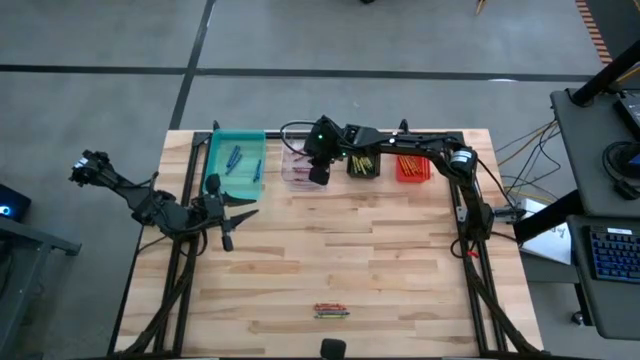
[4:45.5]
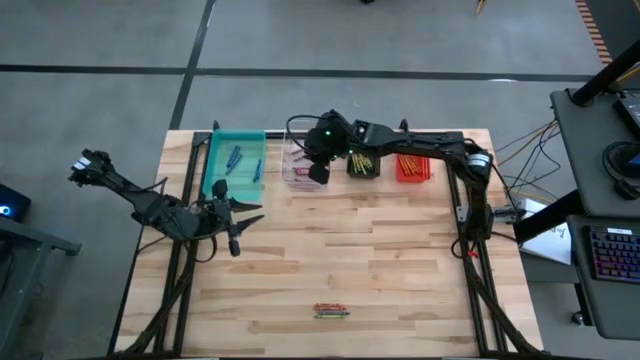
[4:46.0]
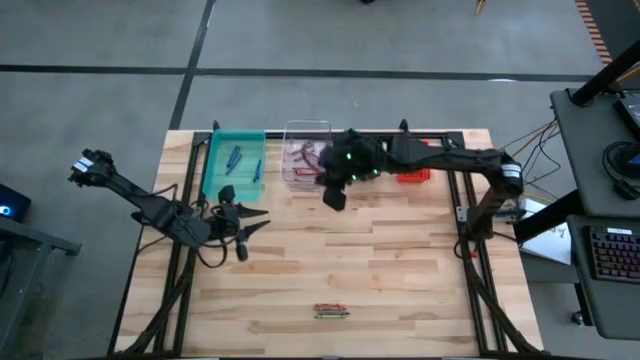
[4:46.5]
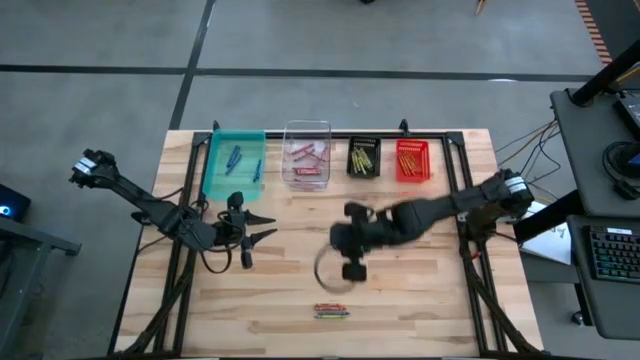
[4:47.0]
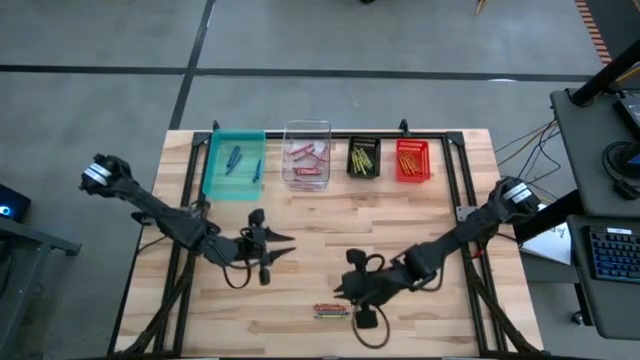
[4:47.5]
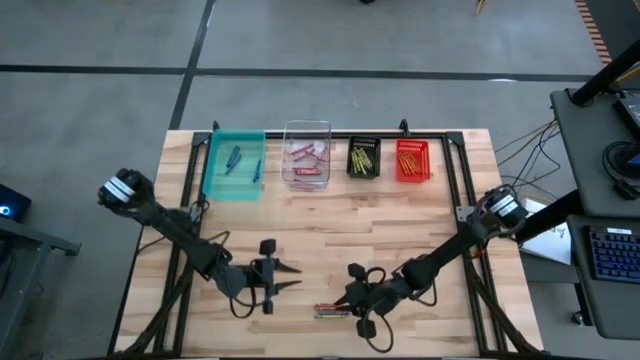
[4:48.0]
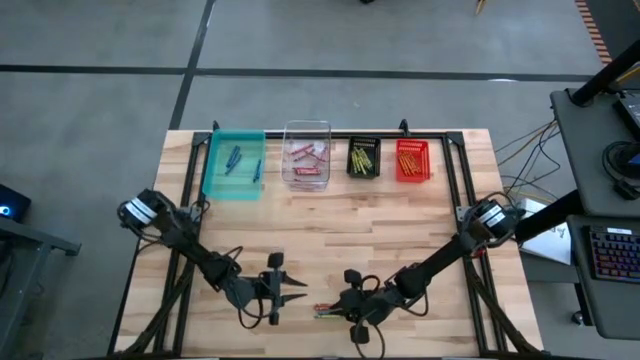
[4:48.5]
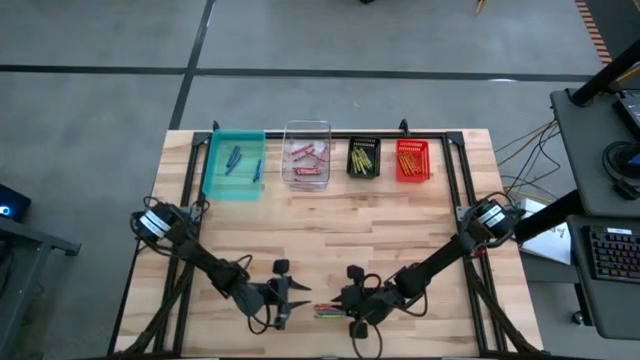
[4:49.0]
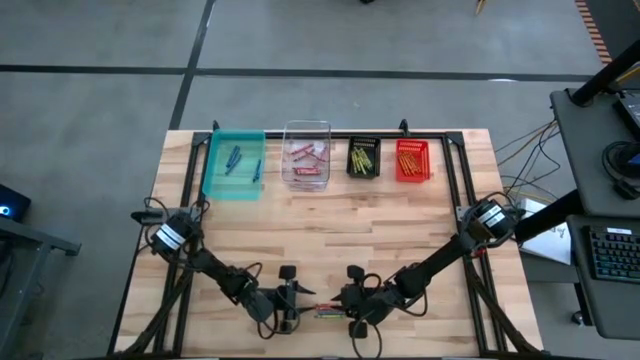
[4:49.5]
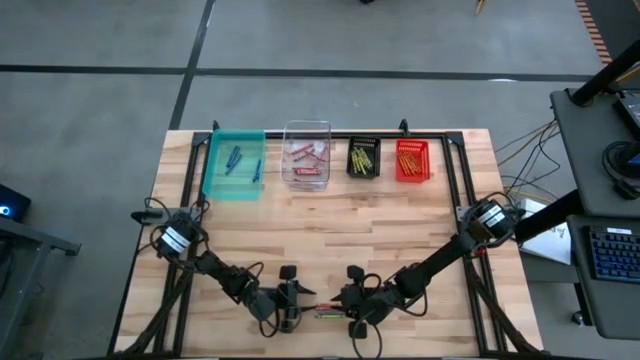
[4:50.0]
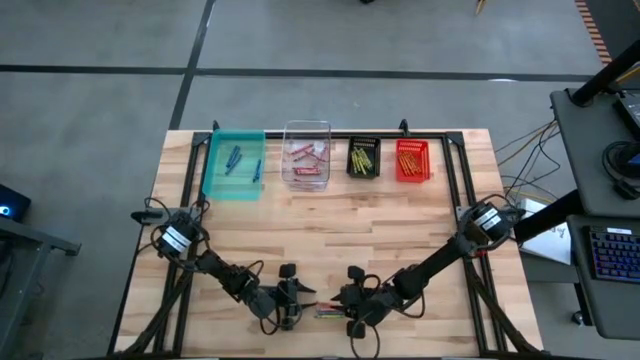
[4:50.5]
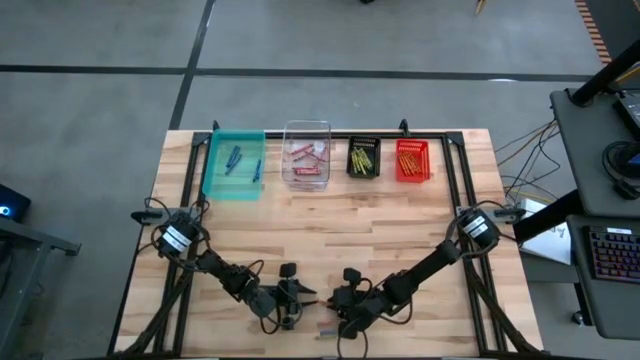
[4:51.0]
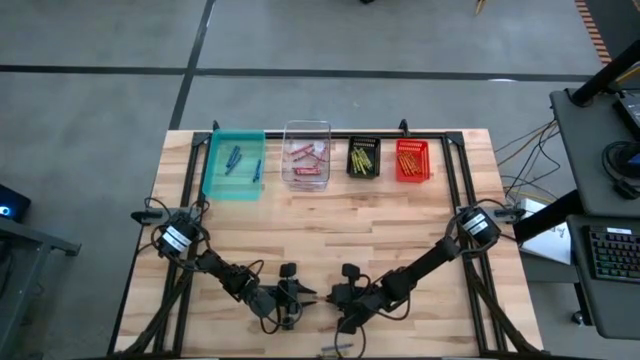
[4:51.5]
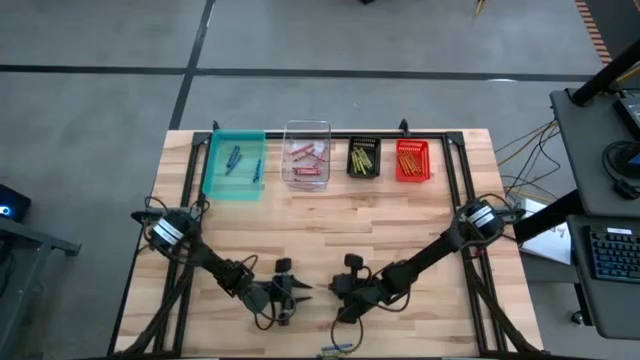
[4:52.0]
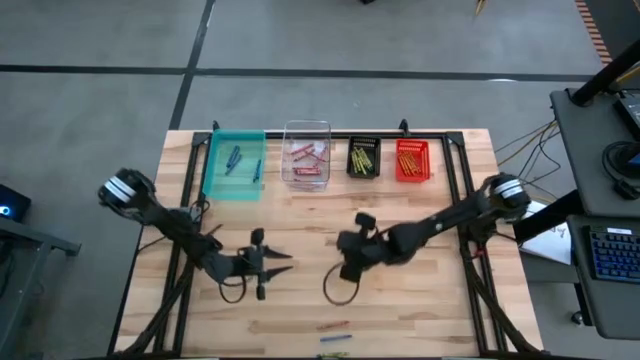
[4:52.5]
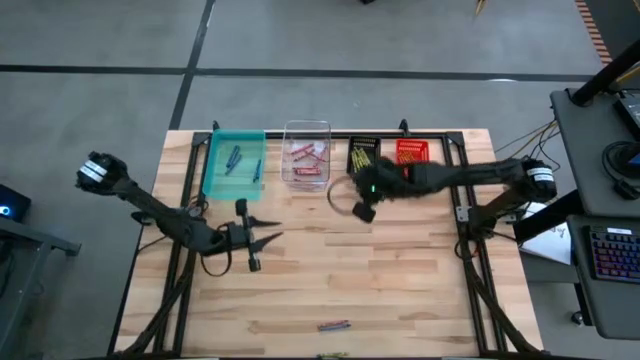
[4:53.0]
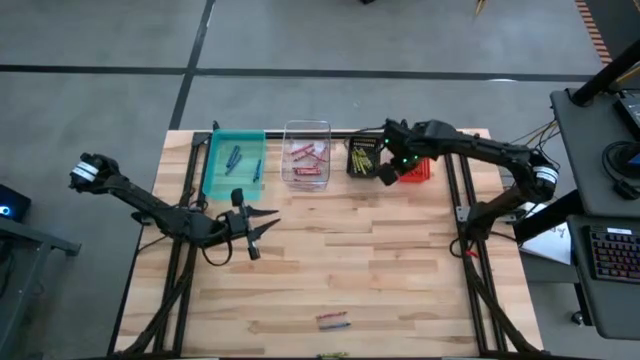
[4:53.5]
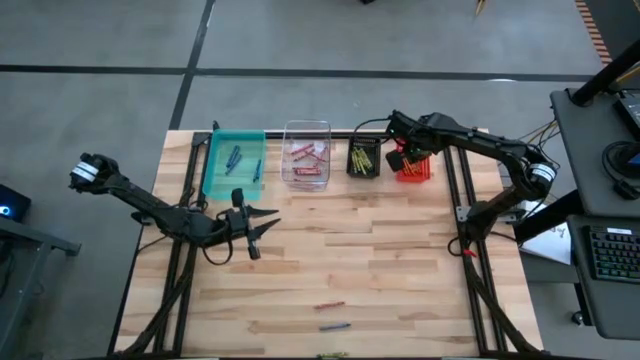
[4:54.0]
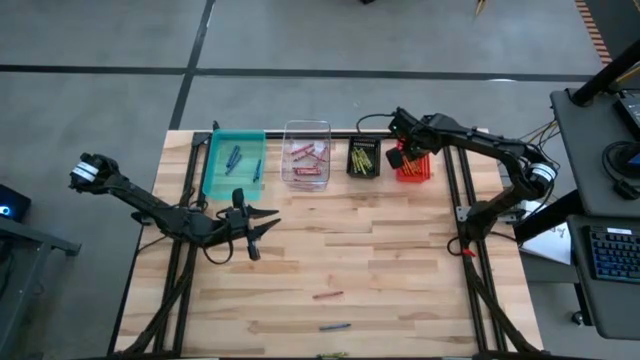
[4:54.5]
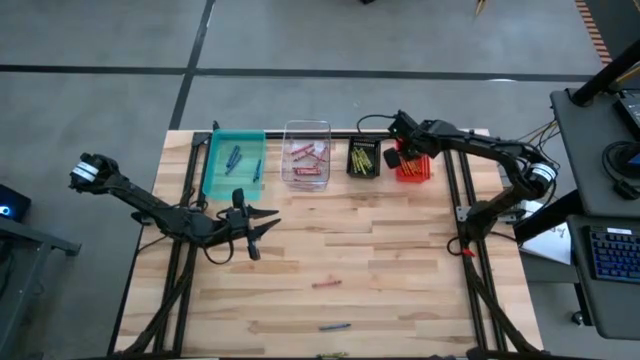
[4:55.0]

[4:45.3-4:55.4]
Task: Sort crayons
Put the orange crayon into the orange bin

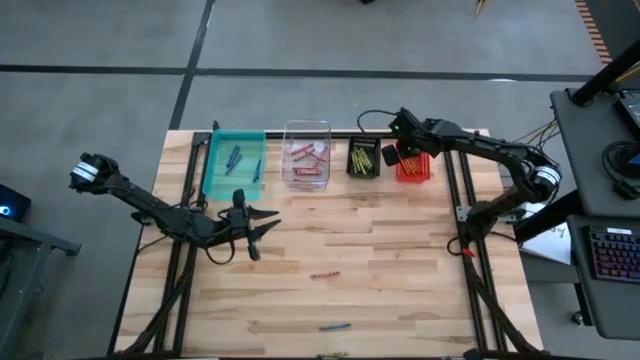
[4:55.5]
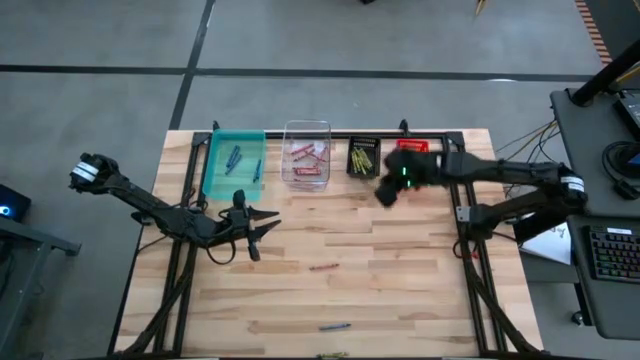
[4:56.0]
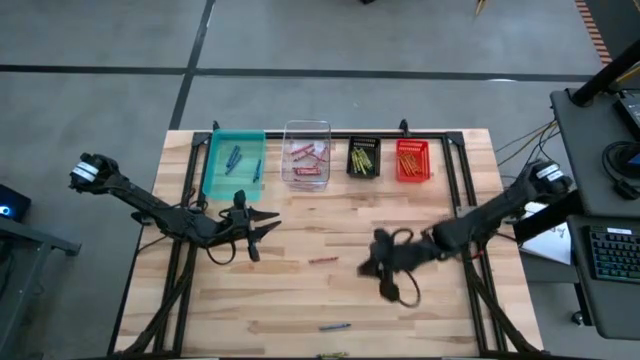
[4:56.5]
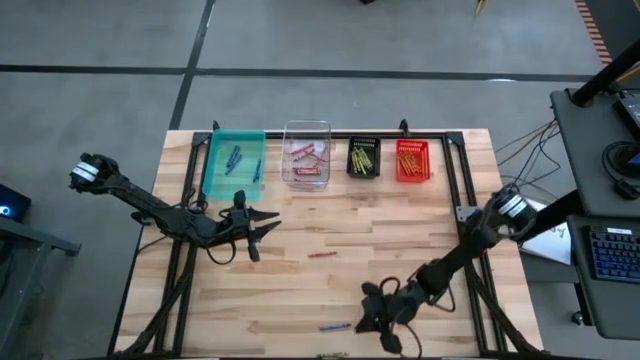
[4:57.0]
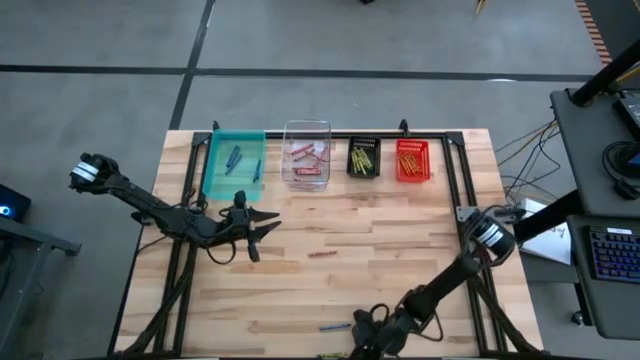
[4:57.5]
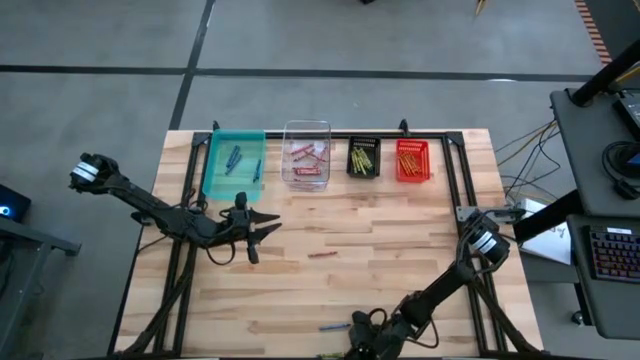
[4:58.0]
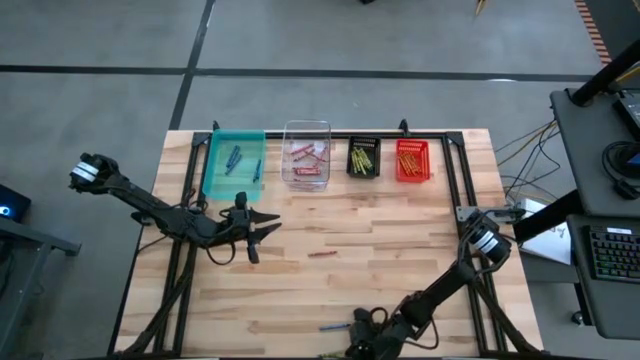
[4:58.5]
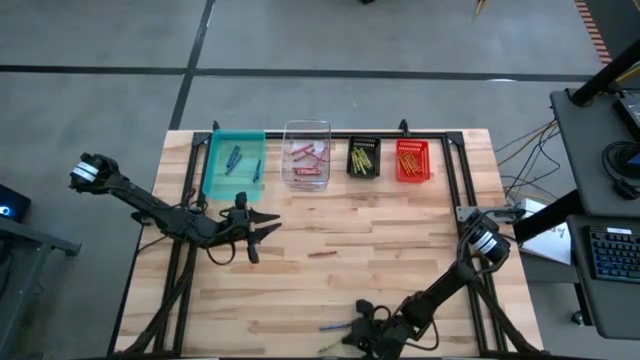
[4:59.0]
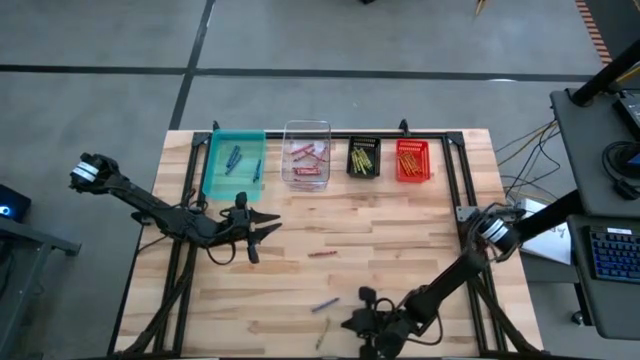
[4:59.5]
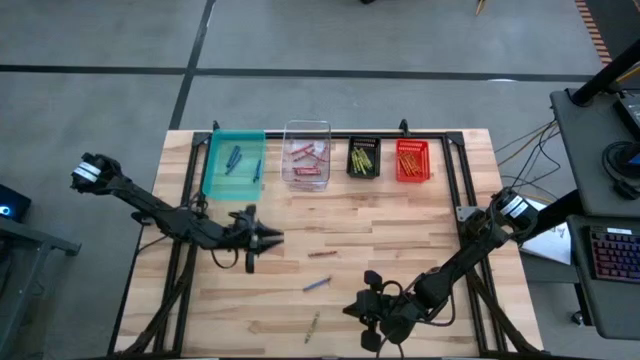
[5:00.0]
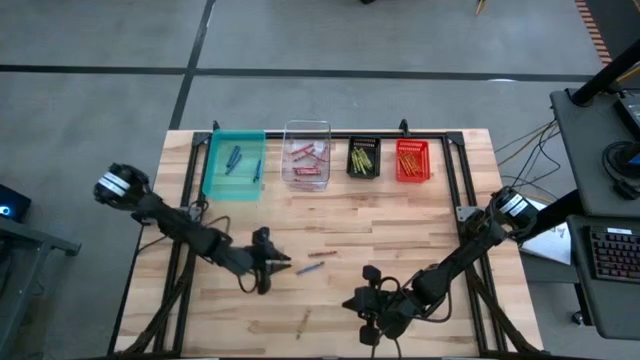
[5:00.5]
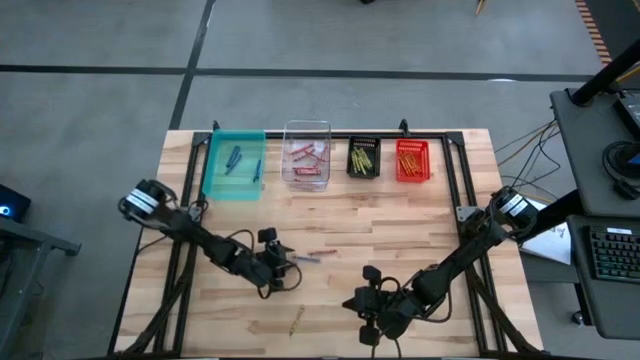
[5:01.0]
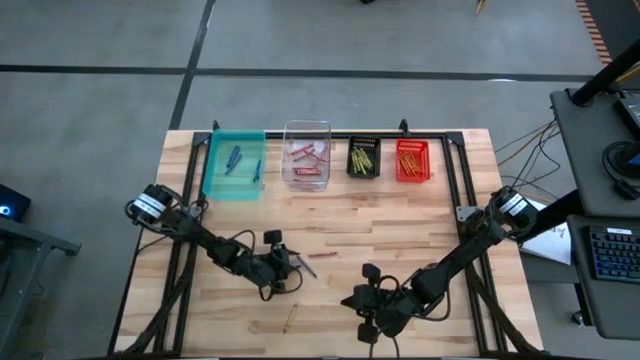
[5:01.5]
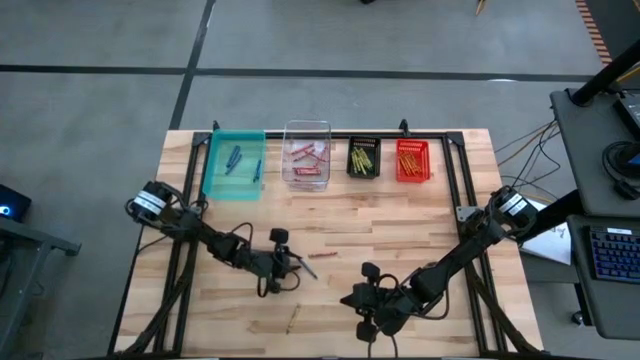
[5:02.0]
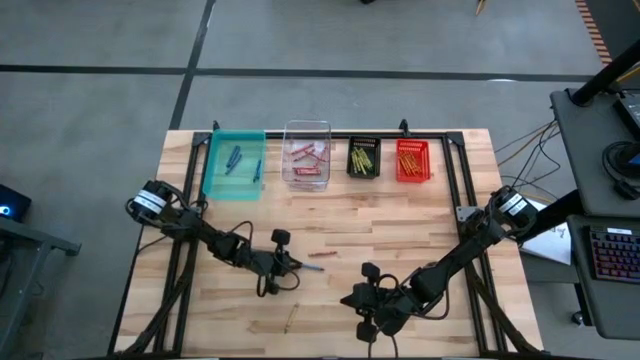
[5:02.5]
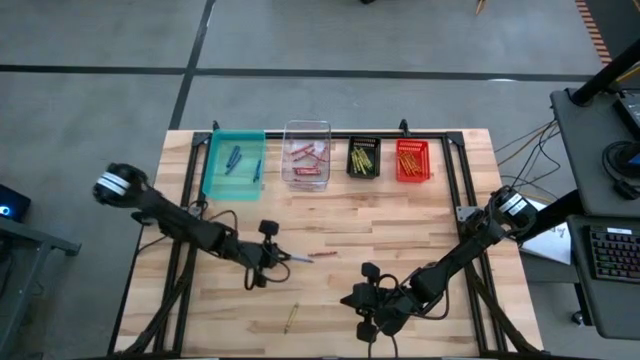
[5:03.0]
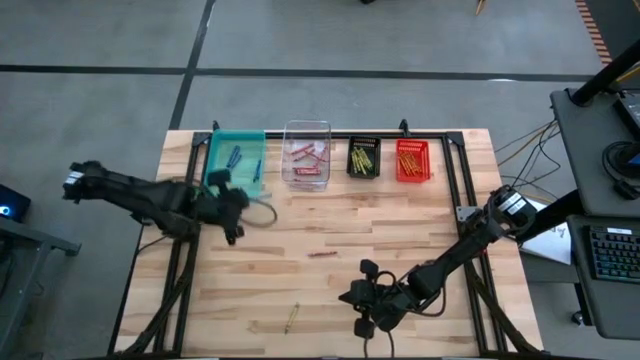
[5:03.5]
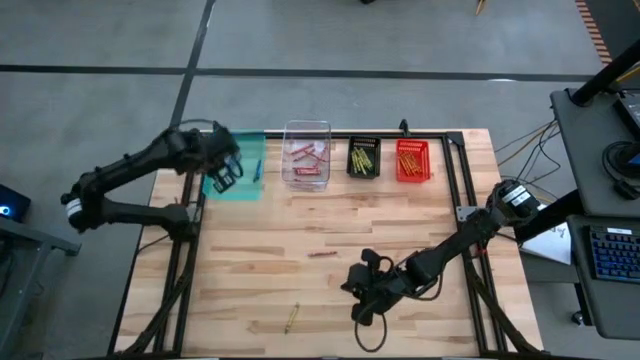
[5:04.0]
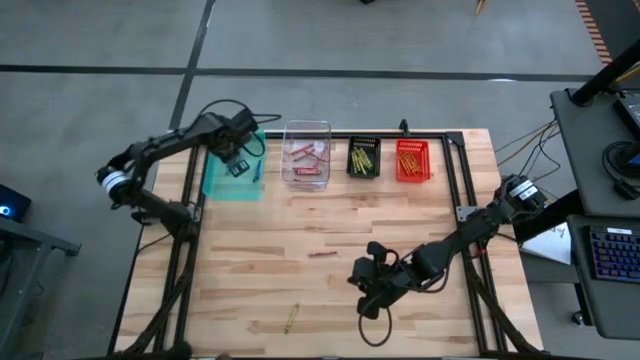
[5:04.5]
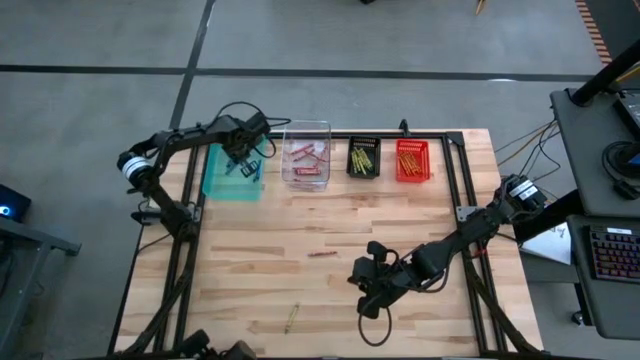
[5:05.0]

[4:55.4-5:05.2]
Put the blue crayon into the green transparent bin

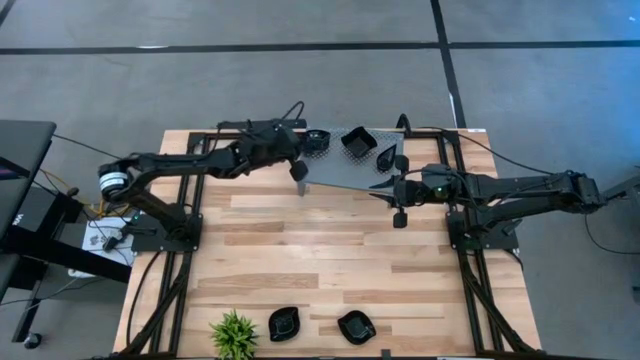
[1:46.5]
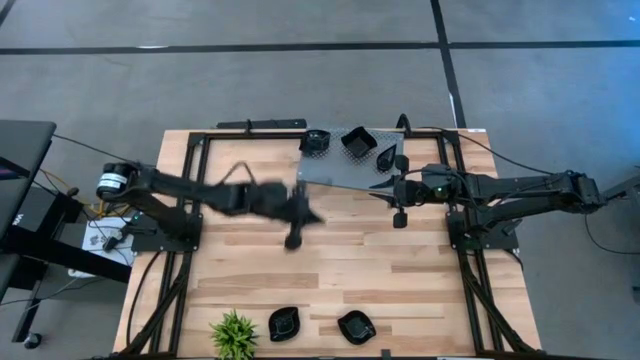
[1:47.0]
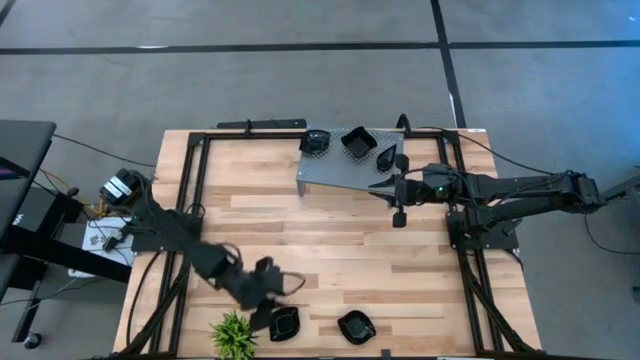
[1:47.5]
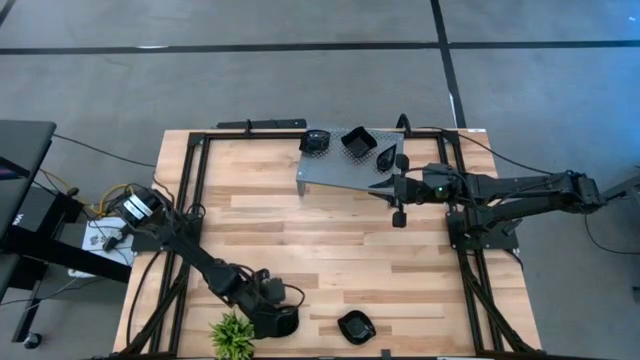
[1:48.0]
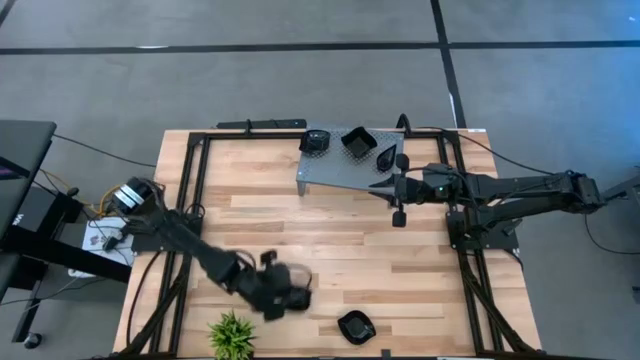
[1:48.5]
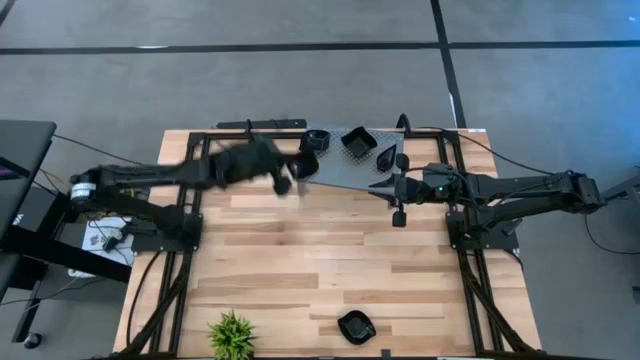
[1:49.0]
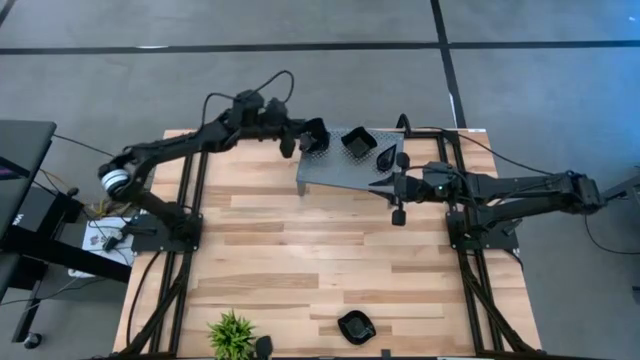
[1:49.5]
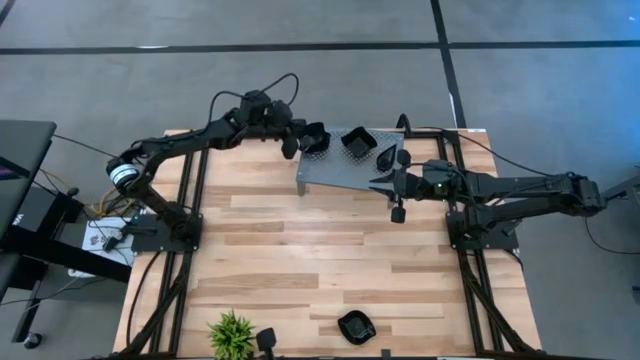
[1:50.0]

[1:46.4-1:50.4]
Task: Pick & Place Mini shaped plates
Stack the black leaf-shaped plate on the other black leaf-shaped plates on the shelf
